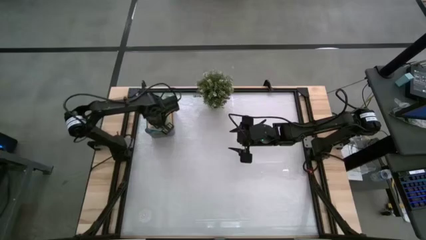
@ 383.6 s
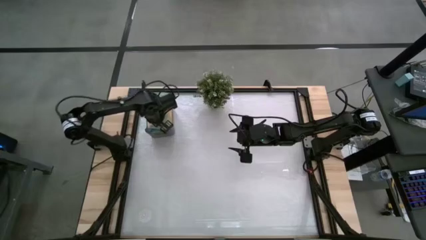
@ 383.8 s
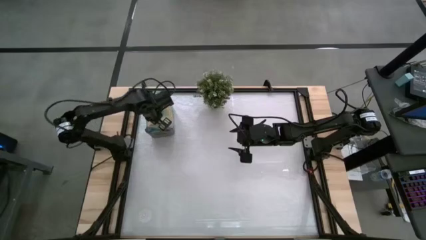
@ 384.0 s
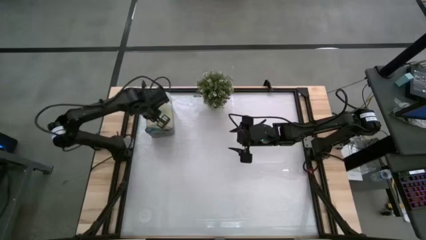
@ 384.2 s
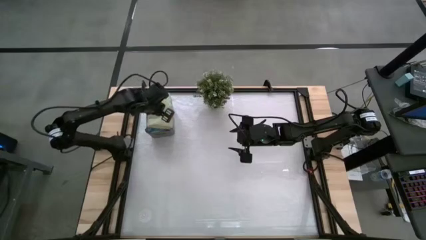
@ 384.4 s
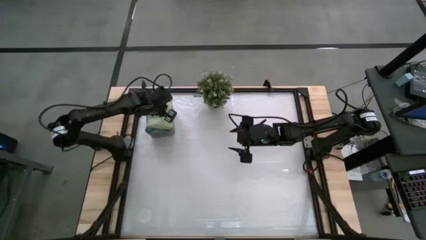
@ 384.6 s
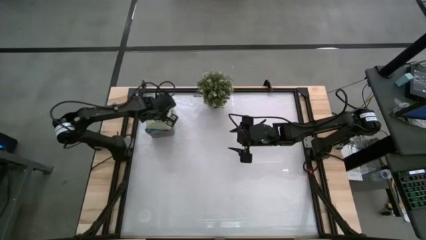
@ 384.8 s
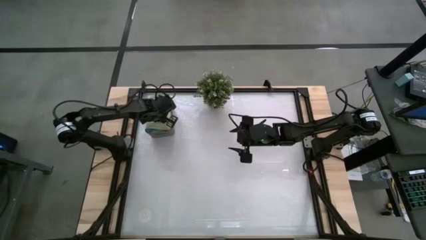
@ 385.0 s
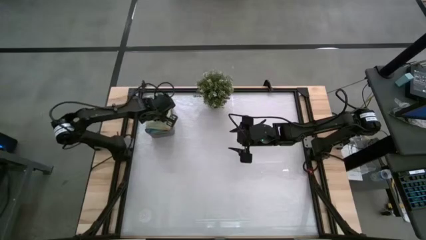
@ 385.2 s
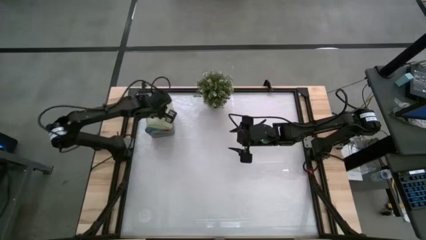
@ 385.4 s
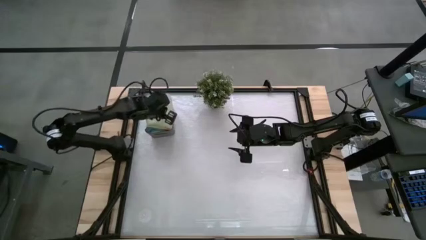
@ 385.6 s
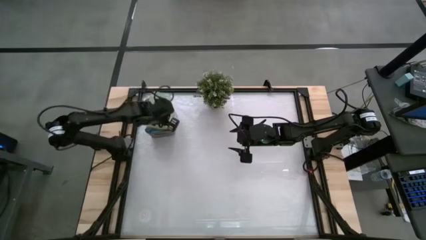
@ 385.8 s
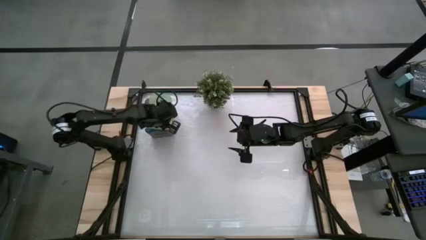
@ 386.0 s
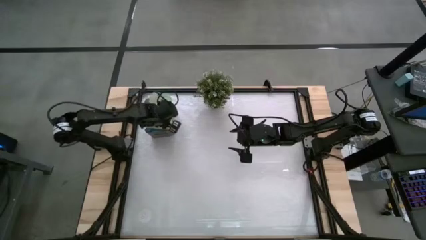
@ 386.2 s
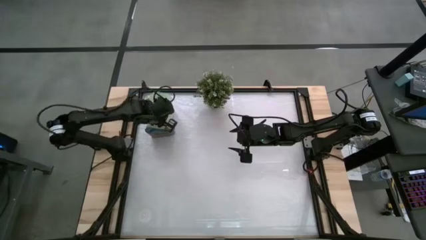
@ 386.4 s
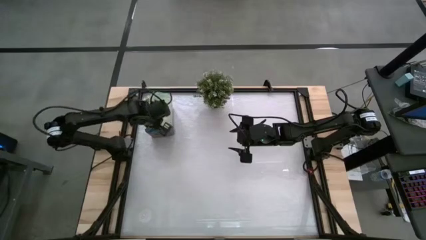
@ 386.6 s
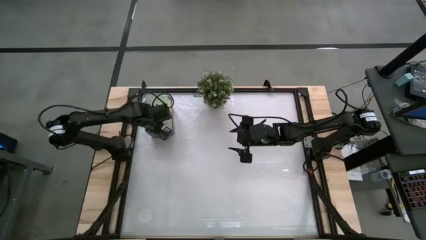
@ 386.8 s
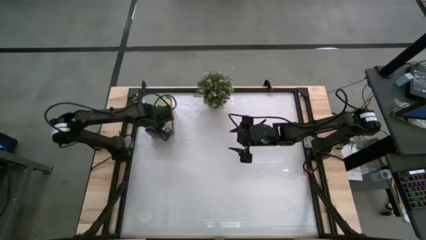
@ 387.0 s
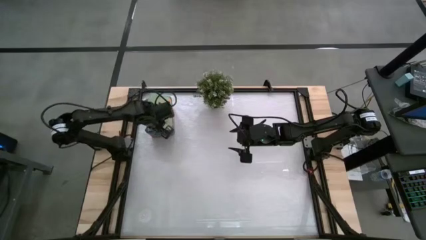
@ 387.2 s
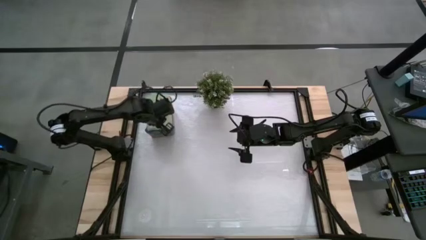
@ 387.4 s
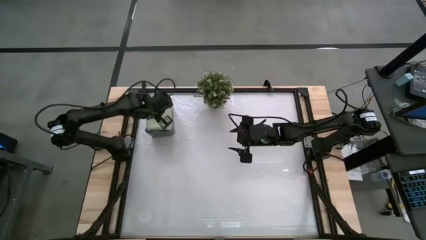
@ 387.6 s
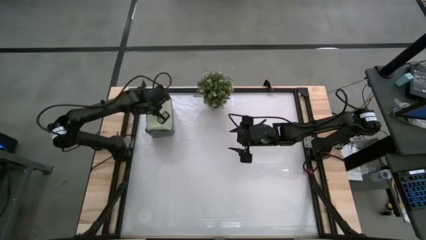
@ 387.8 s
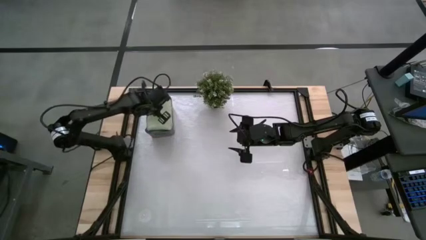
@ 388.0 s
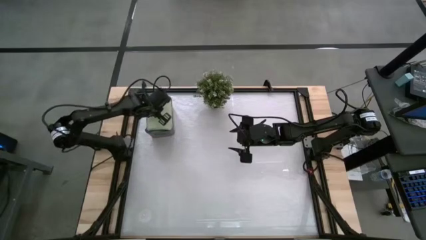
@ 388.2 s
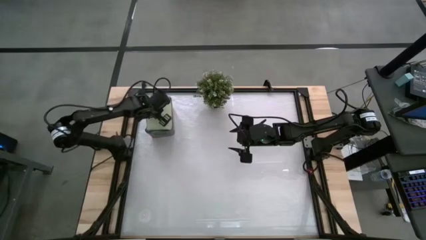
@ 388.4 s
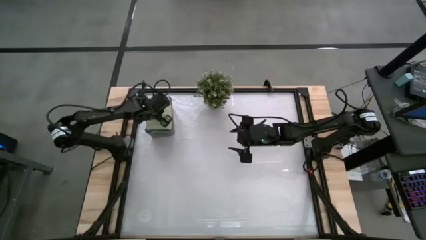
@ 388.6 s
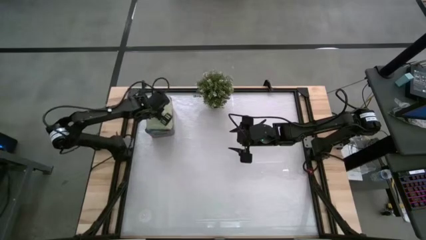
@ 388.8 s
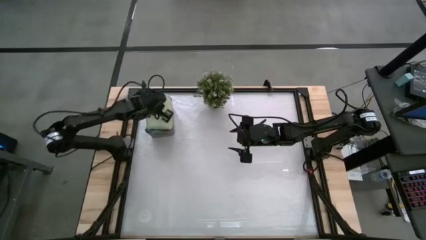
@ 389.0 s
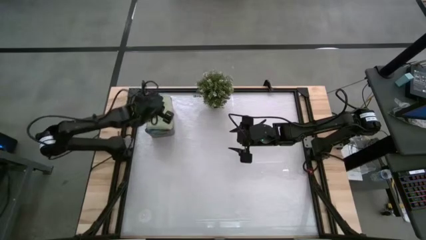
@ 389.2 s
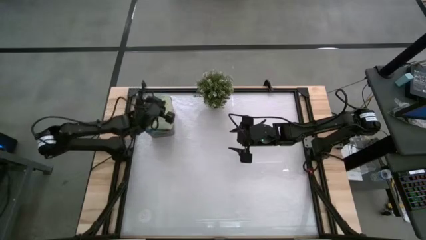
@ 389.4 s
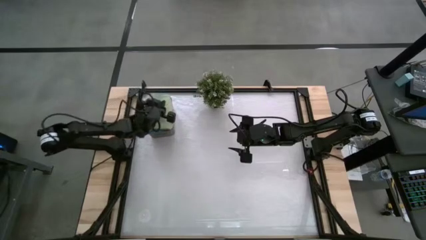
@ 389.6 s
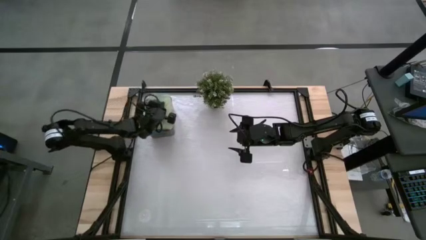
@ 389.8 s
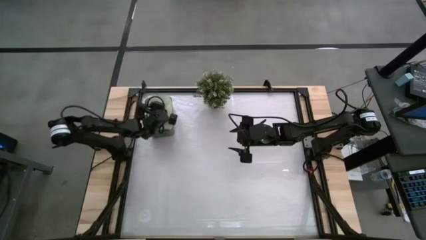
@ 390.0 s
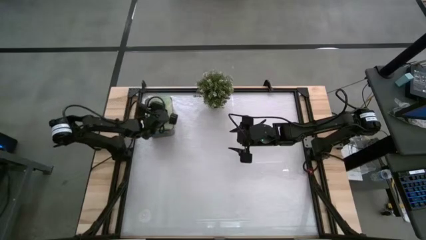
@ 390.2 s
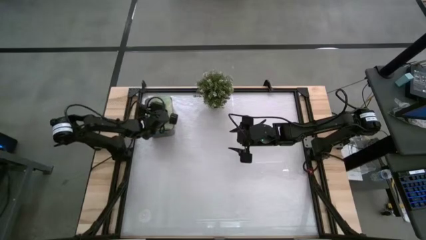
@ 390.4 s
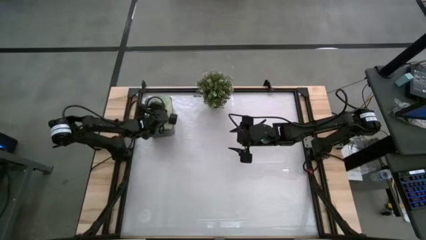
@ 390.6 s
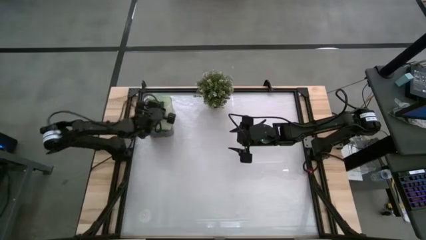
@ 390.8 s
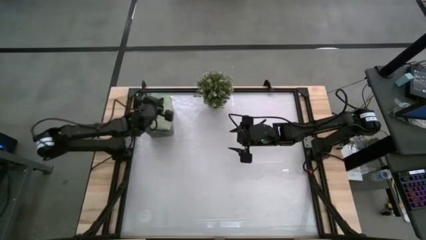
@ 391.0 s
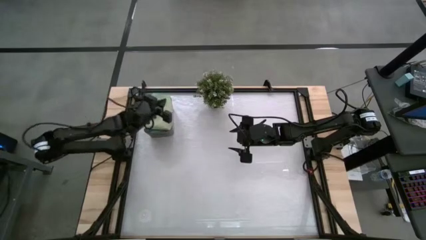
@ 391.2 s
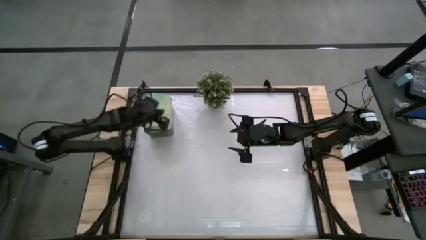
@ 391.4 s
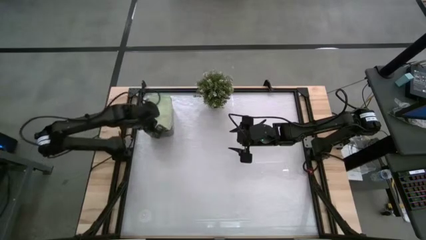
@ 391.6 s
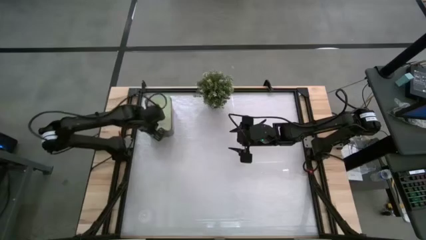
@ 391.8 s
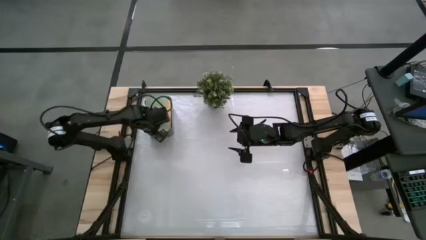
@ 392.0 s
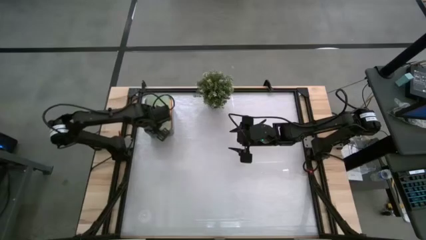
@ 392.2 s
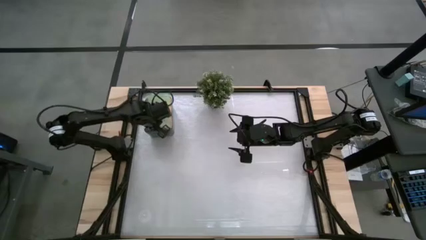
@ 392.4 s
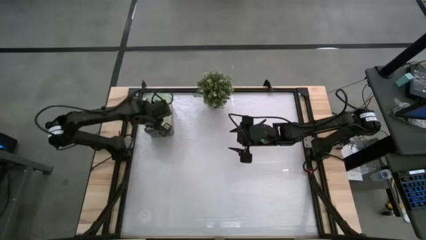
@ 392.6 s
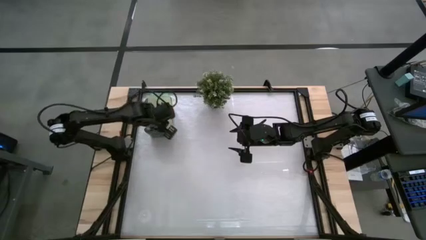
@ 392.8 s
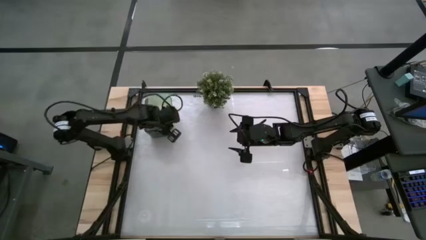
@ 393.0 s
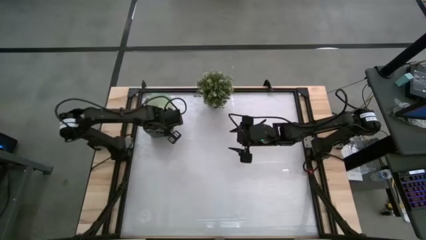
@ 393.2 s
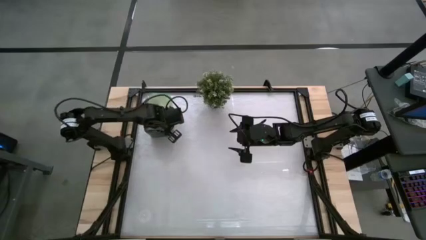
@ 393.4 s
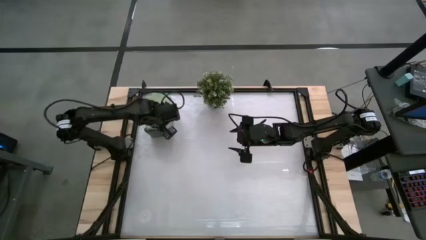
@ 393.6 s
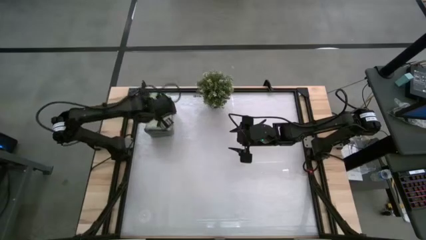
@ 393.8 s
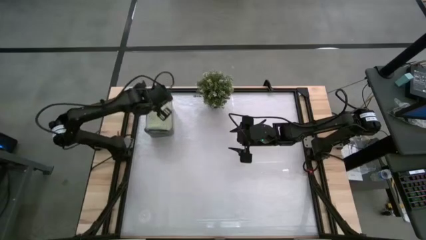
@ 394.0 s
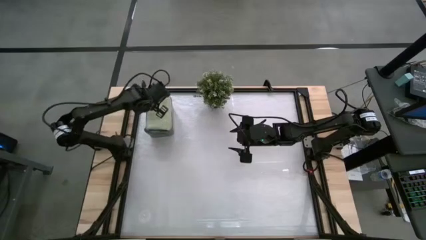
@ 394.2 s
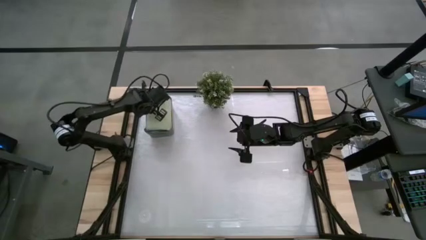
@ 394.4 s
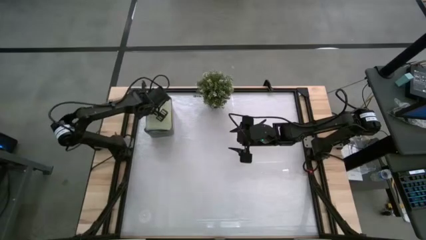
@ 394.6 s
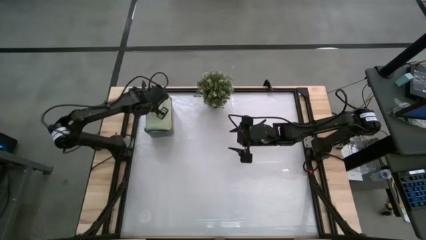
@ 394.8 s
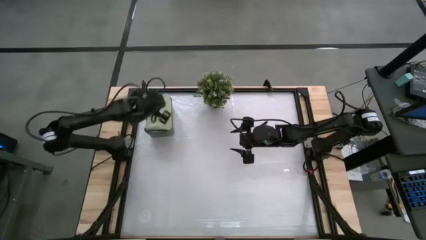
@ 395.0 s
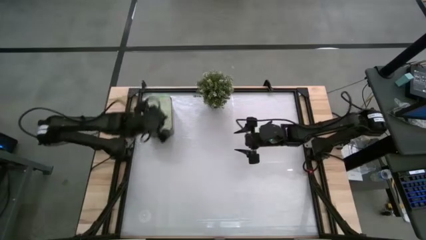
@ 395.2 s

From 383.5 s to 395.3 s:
Task: Fold microfiber towels
Put the green microfiber cloth into the black bin

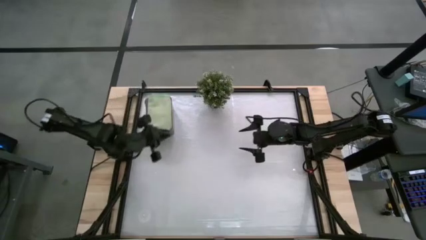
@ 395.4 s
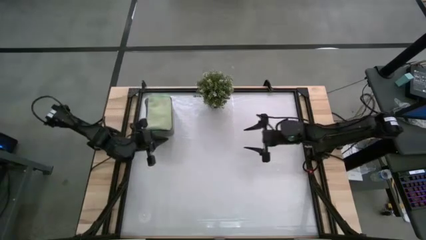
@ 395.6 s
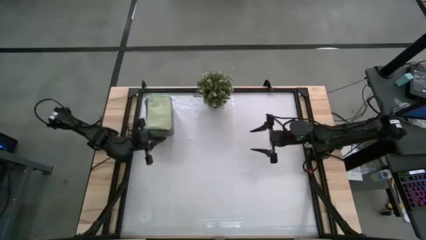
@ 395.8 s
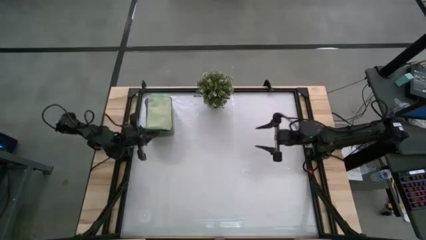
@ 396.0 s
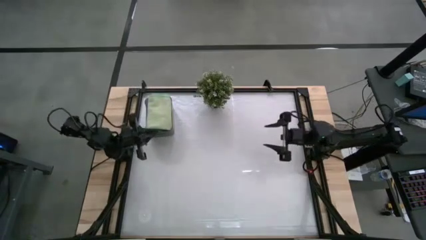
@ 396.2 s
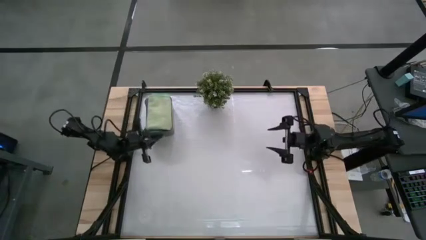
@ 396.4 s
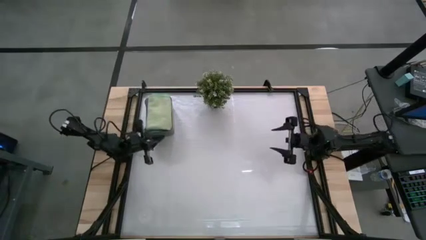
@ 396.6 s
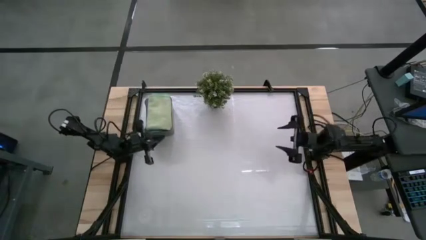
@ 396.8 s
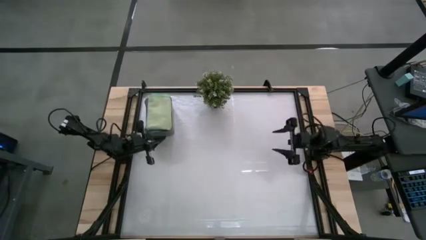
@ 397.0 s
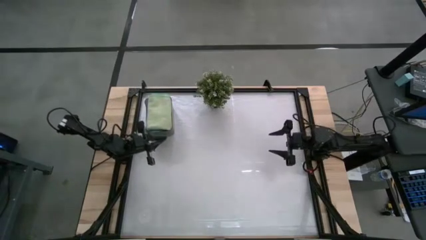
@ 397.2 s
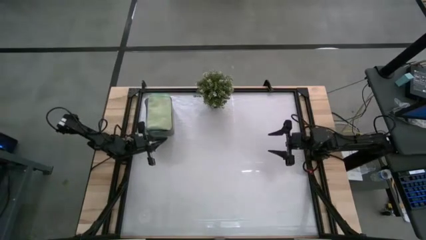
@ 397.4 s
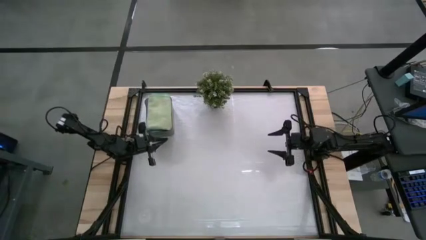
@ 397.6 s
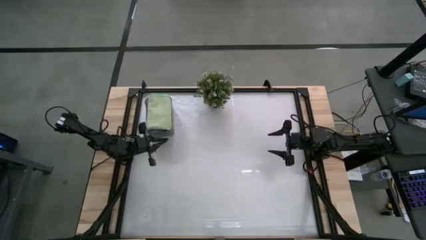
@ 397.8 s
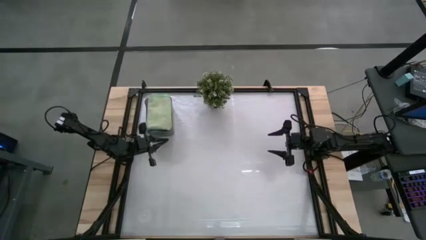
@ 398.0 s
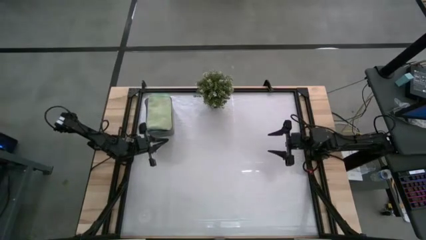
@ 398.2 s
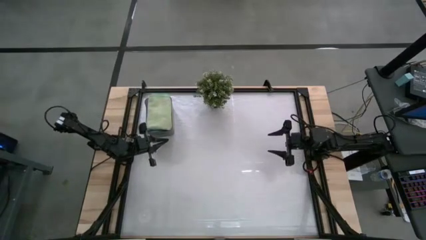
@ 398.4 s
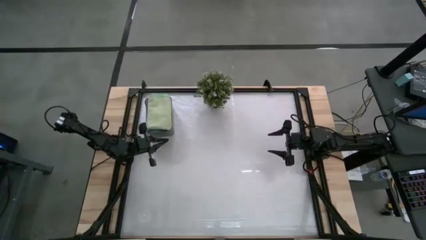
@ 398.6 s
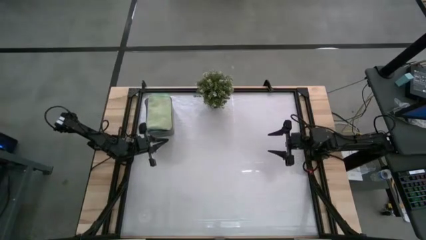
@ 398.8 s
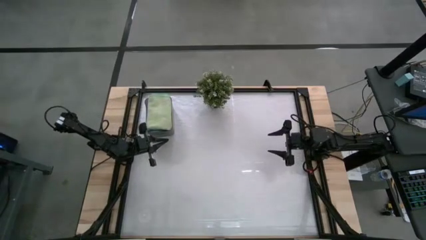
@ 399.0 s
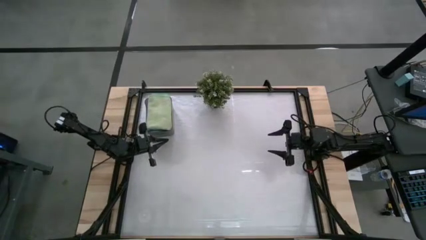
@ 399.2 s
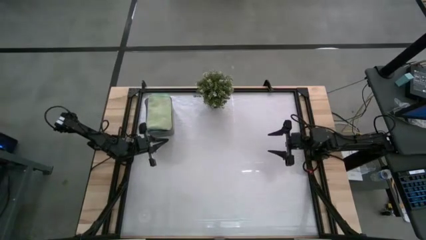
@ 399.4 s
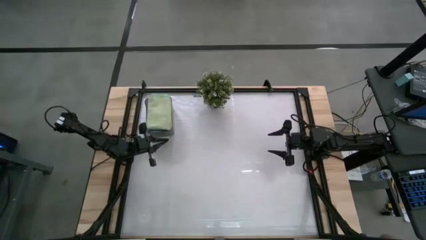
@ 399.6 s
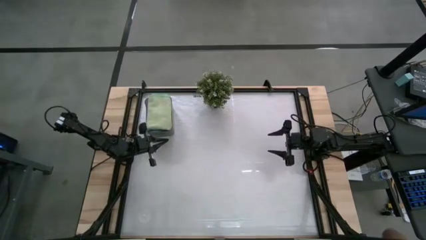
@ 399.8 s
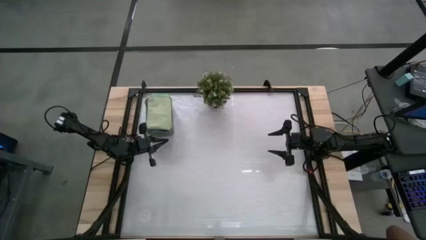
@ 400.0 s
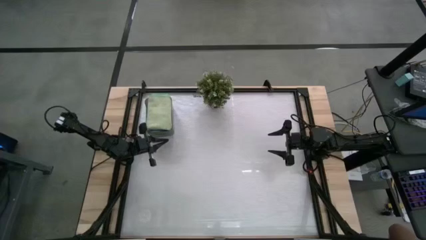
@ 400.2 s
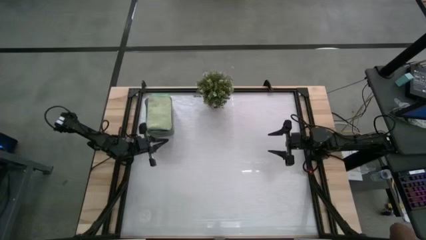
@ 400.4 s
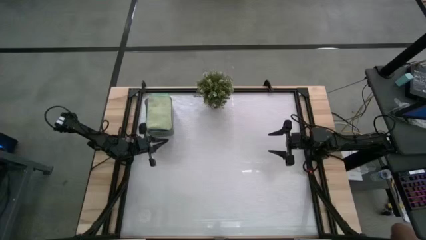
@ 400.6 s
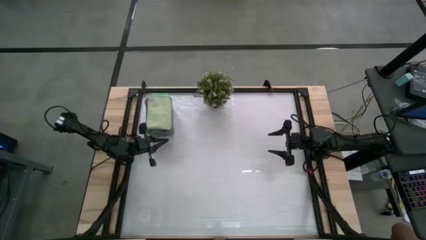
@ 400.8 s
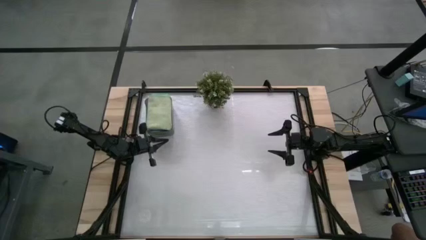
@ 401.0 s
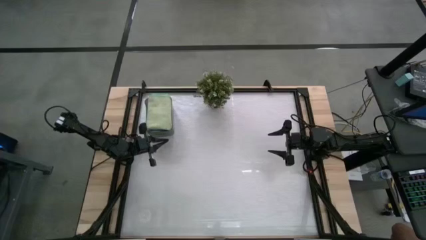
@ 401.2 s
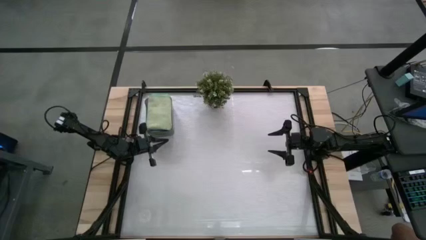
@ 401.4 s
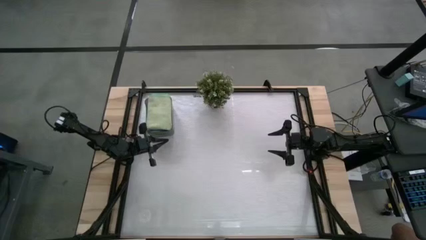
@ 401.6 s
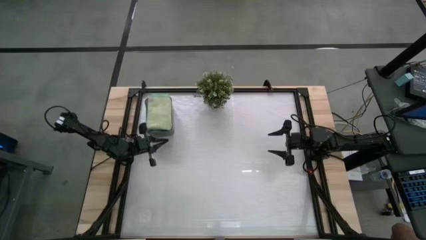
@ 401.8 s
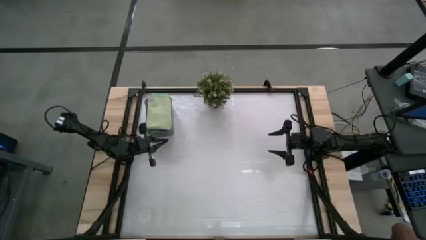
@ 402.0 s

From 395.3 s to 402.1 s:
Return to Home Position
